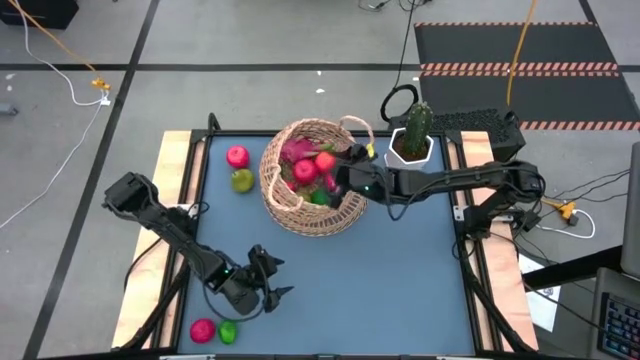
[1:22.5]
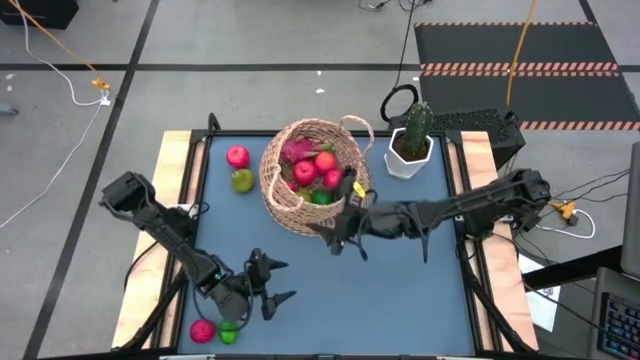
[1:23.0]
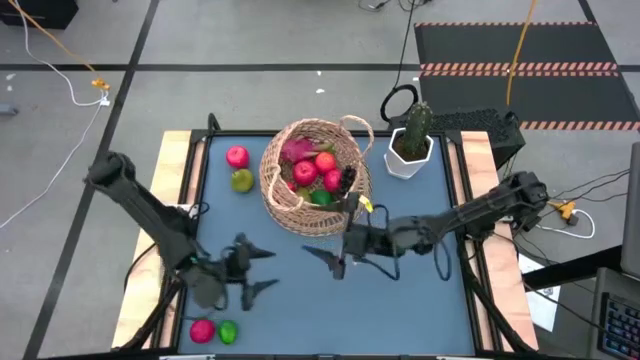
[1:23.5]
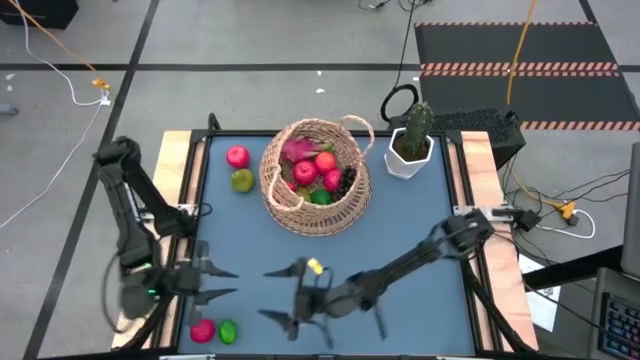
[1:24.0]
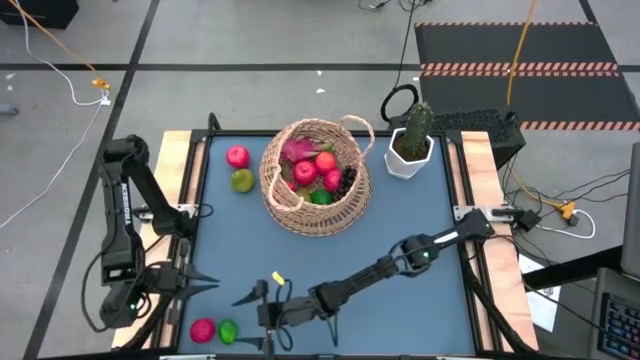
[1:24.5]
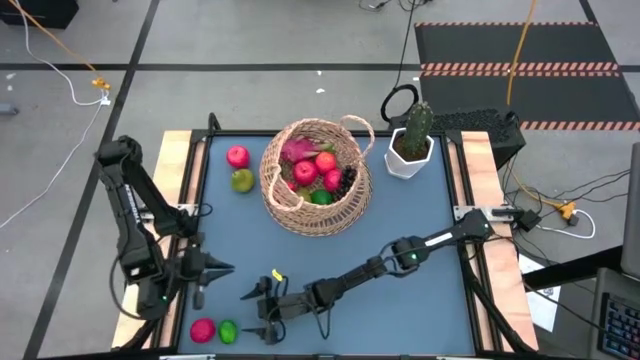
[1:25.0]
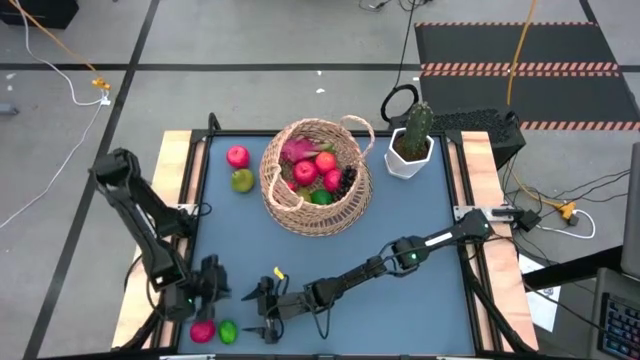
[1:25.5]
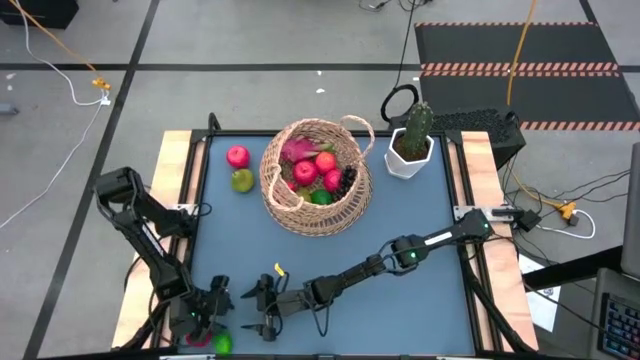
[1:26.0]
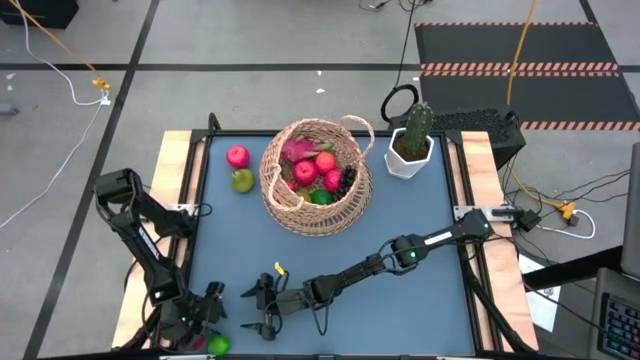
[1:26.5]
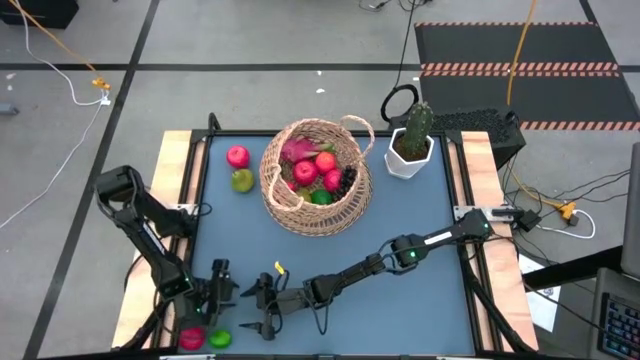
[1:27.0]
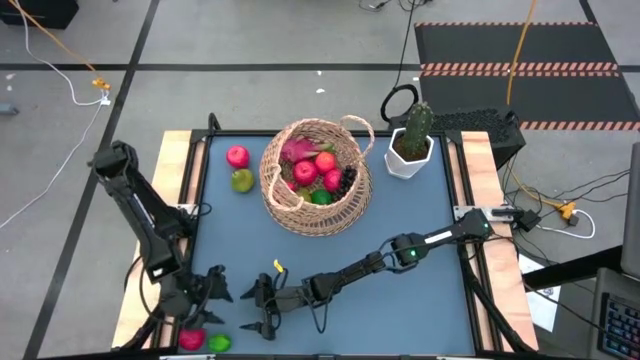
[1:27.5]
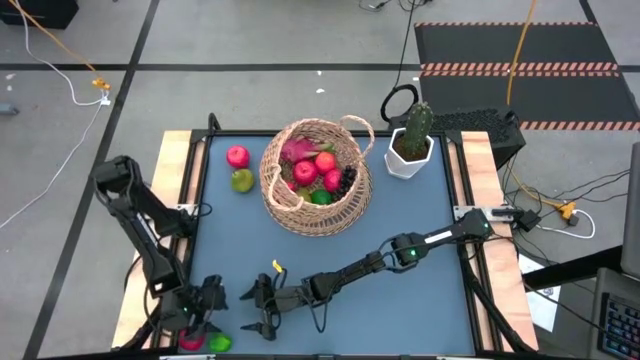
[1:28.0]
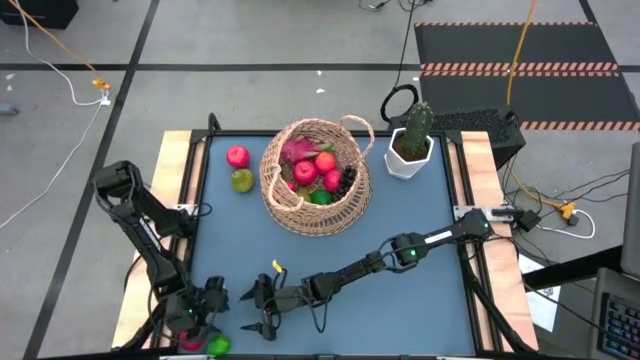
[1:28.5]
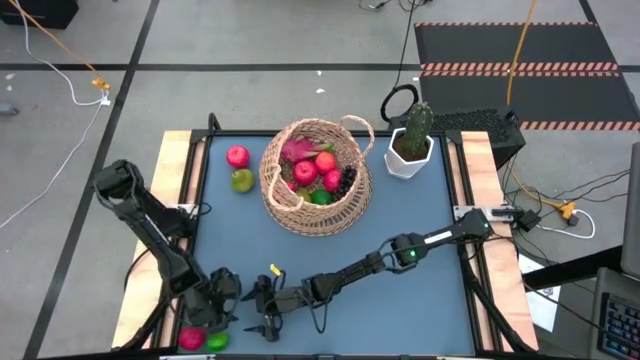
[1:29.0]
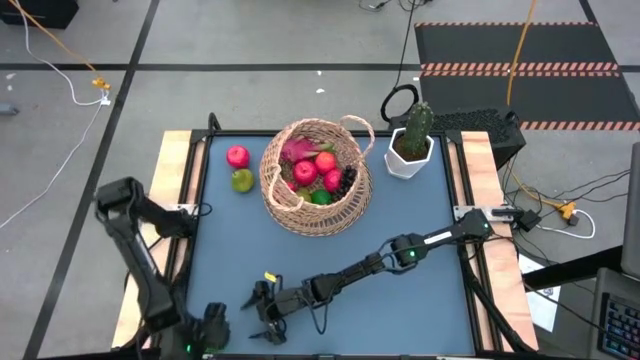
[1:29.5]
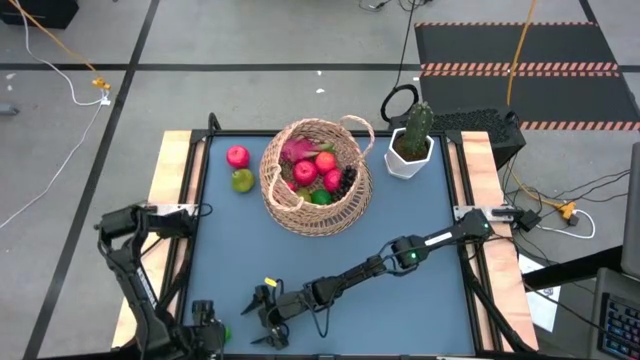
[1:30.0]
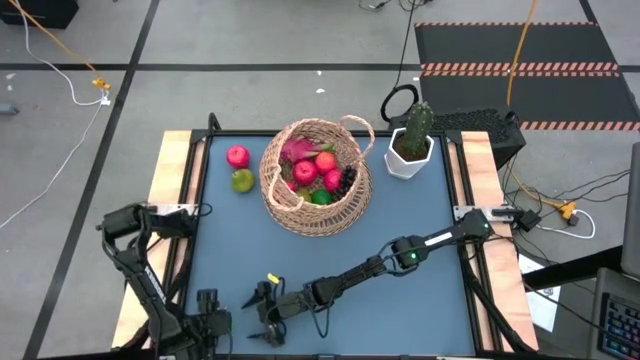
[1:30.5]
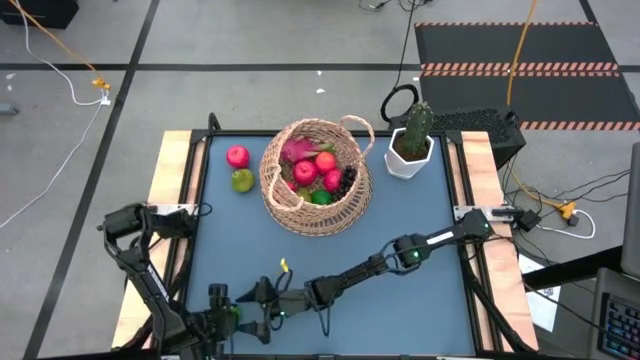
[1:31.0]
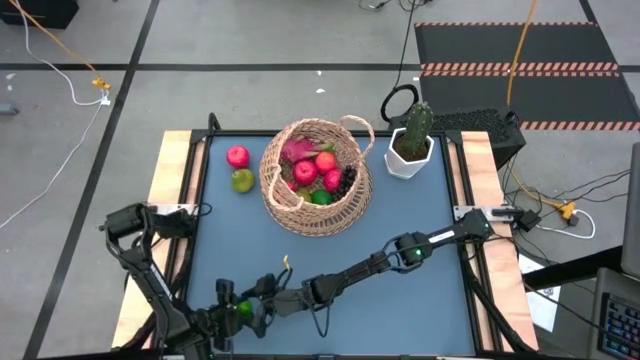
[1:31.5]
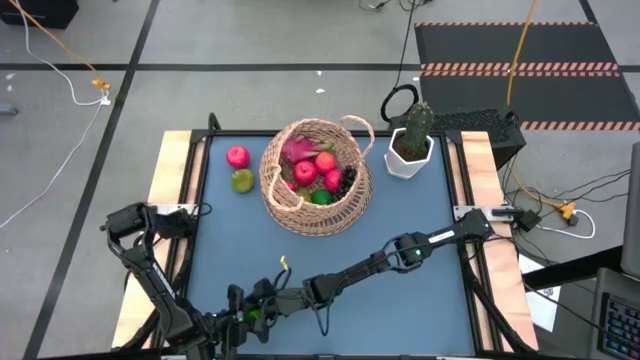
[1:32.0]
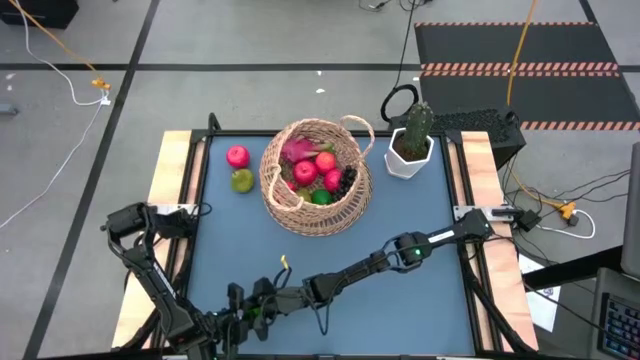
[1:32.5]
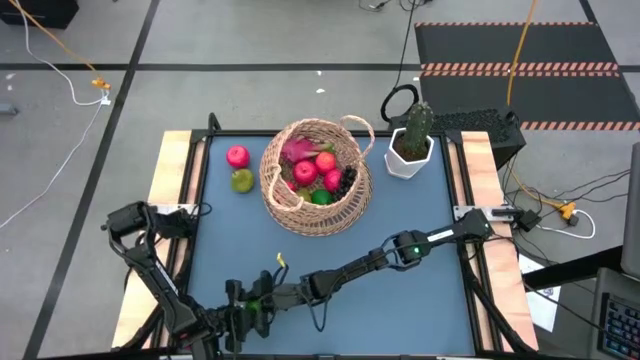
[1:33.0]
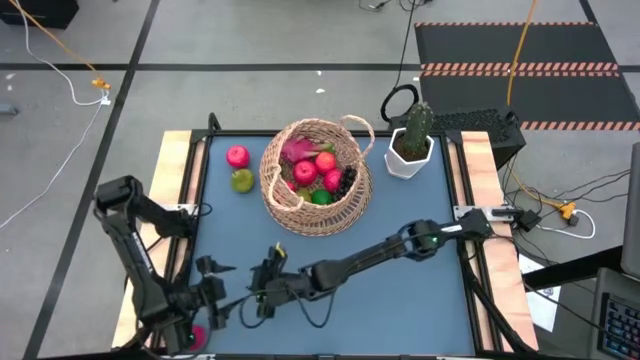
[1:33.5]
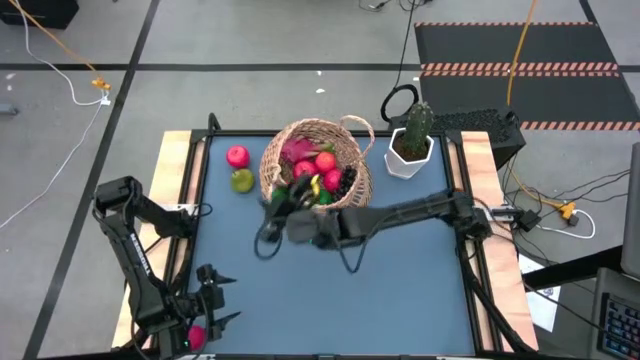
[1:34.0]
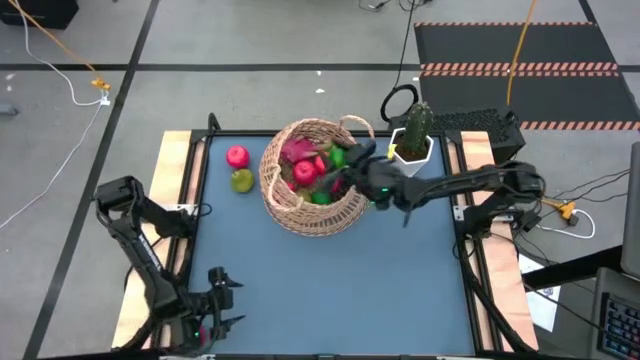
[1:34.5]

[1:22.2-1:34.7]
Task: Build produce basket
Put the lime into the brown basket

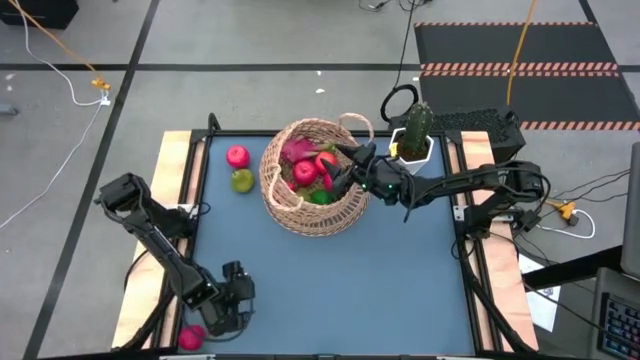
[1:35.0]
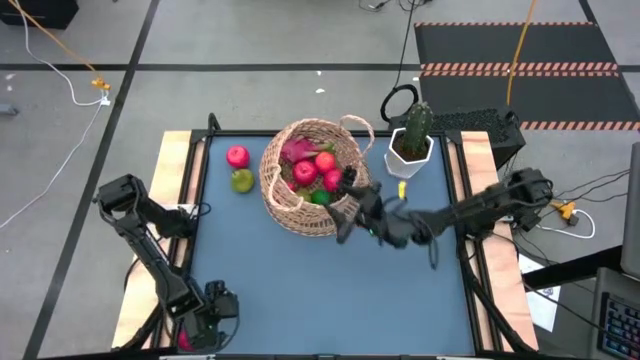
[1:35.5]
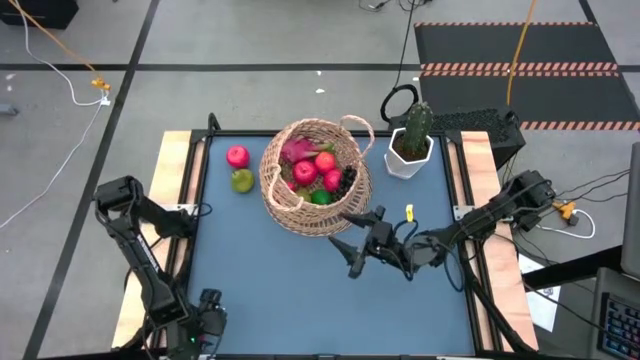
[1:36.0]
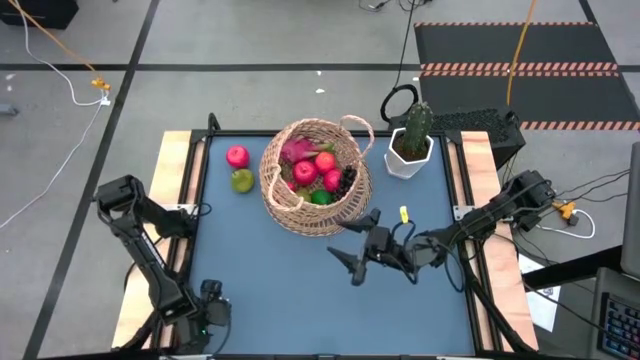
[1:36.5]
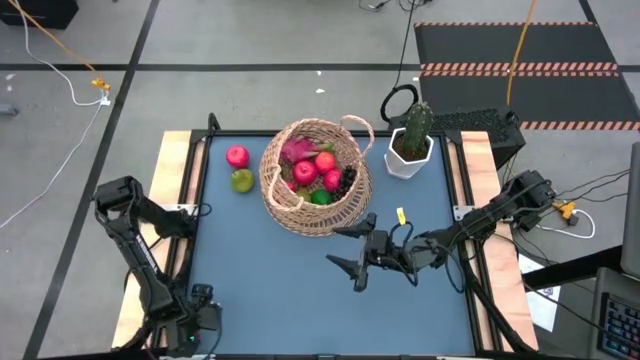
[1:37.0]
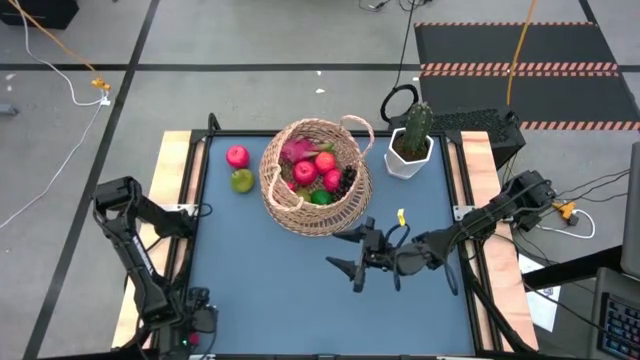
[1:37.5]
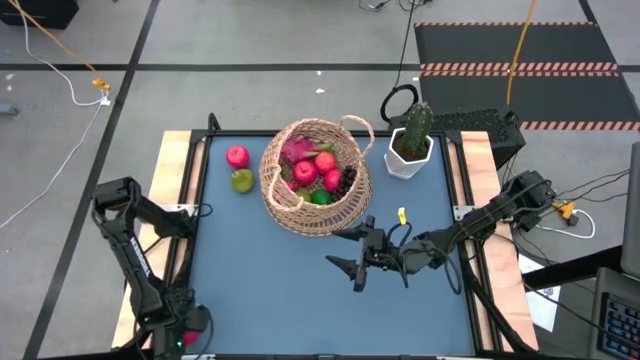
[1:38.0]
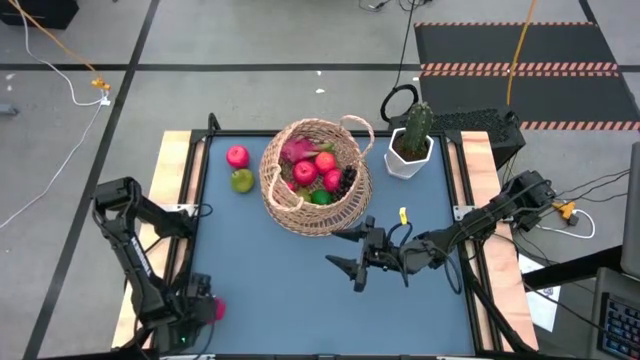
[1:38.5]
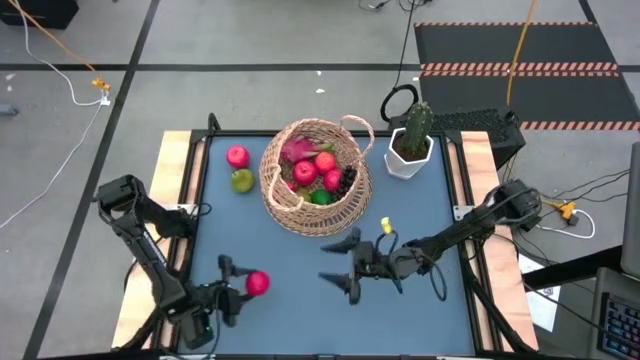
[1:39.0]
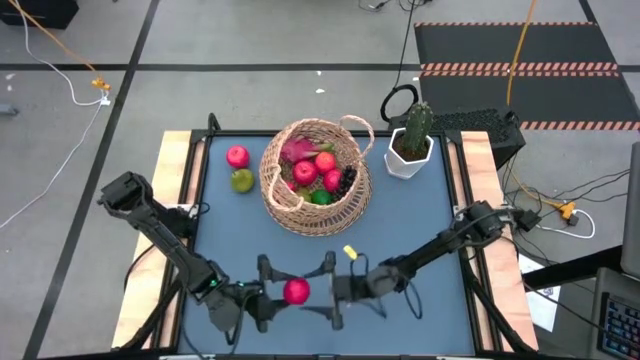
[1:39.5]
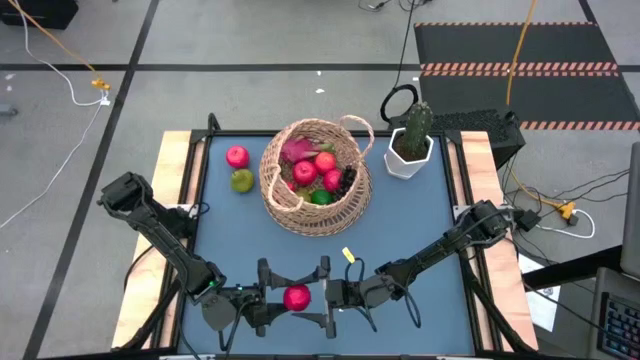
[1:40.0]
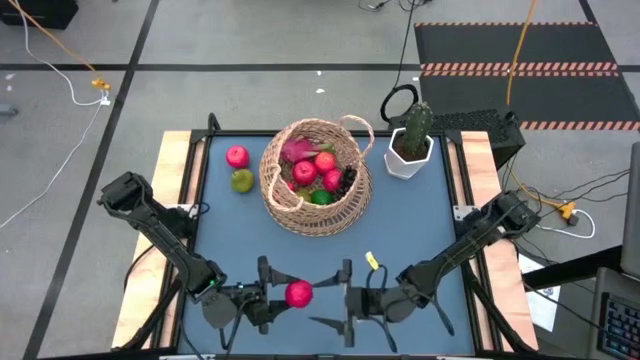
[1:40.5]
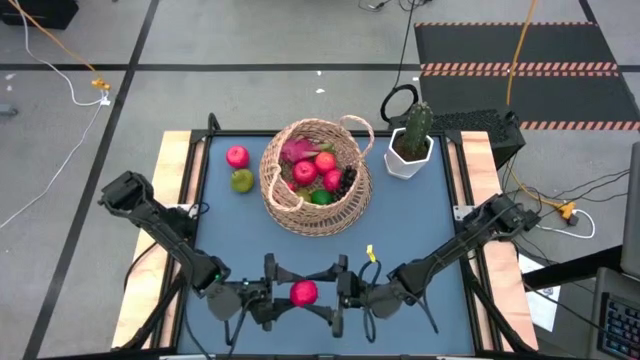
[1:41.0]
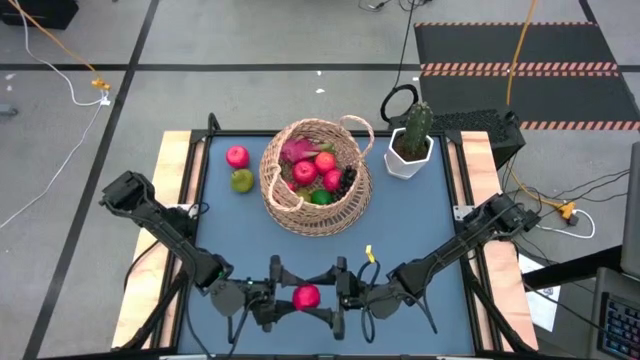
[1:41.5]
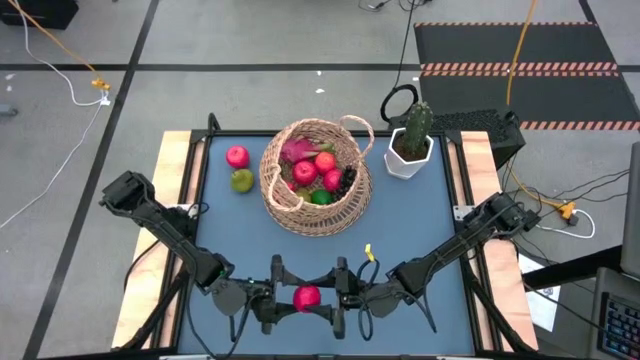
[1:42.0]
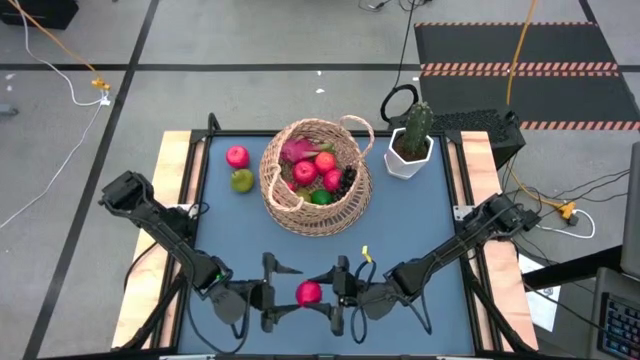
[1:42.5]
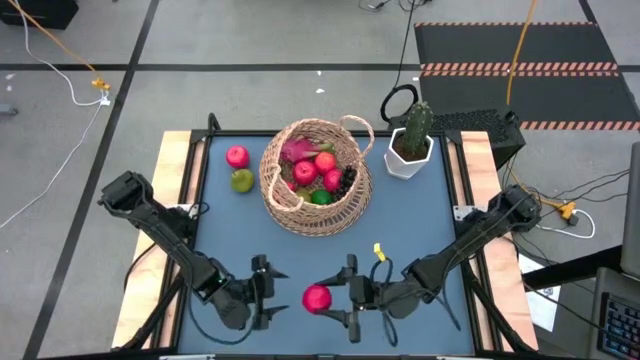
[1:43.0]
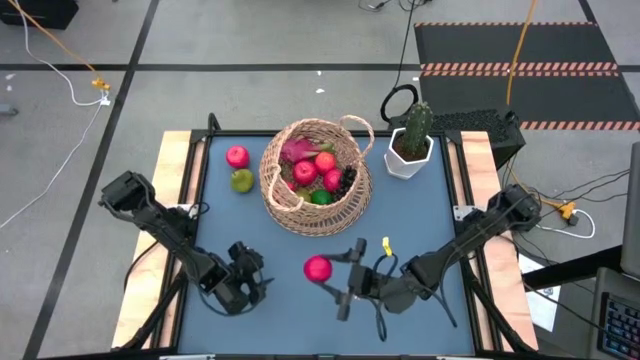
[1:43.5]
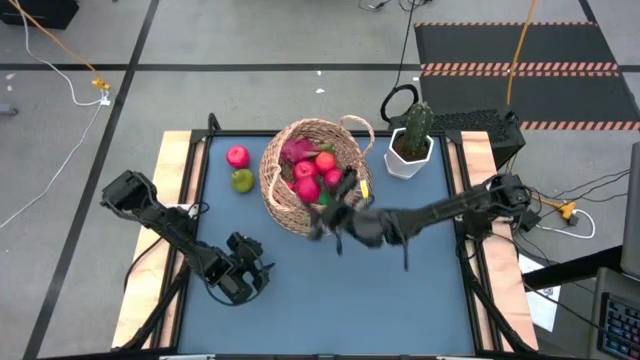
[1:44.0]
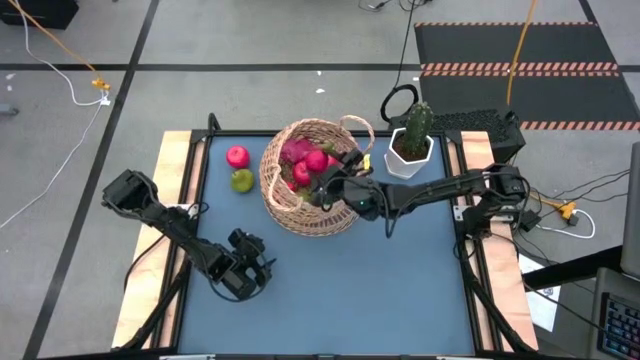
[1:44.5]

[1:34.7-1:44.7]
Put the tomato into the brown basket
